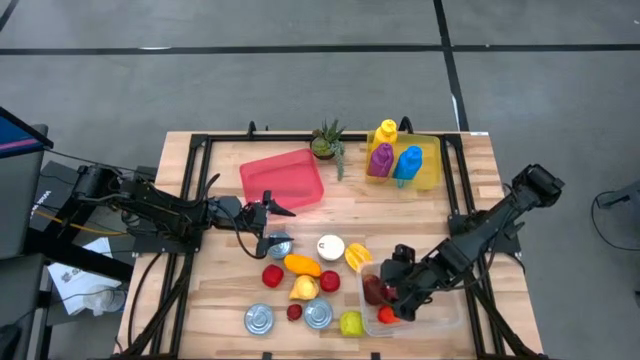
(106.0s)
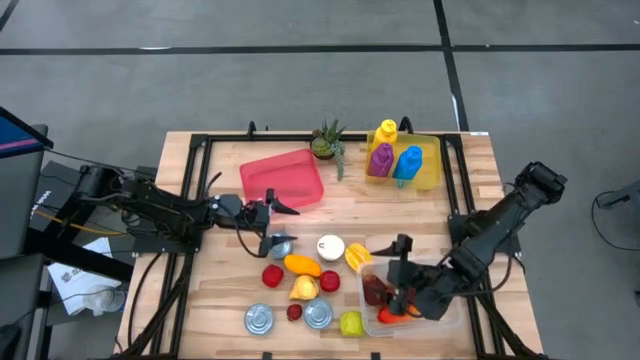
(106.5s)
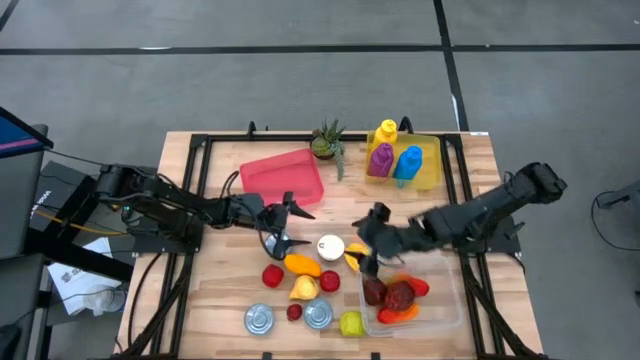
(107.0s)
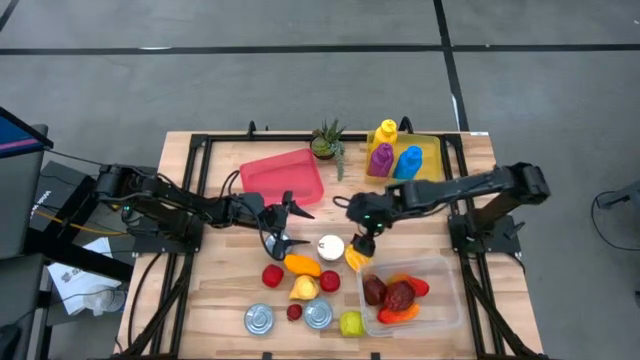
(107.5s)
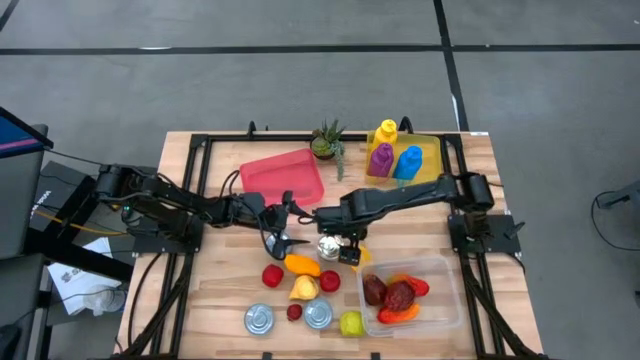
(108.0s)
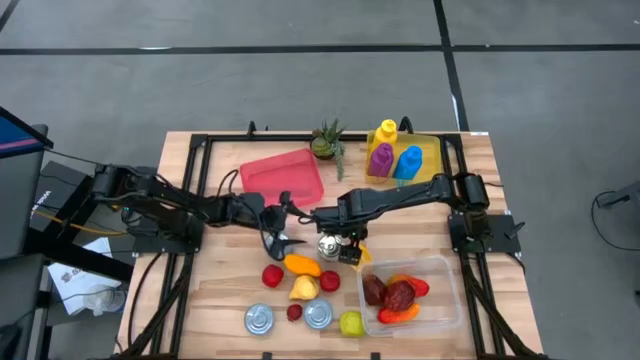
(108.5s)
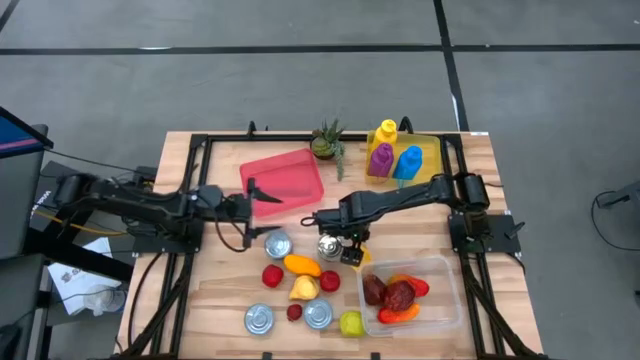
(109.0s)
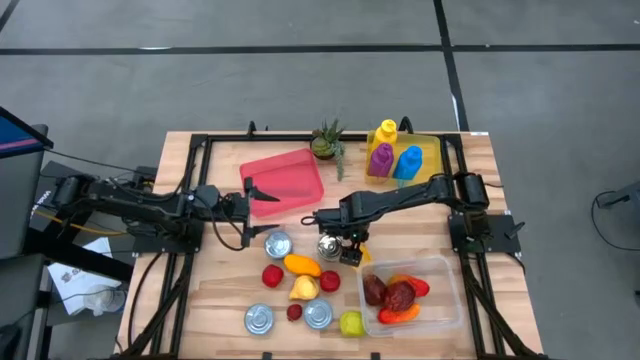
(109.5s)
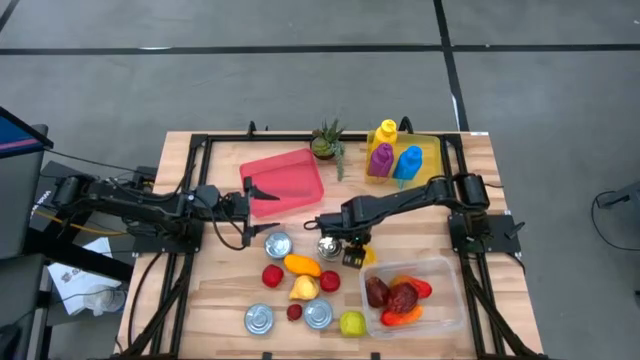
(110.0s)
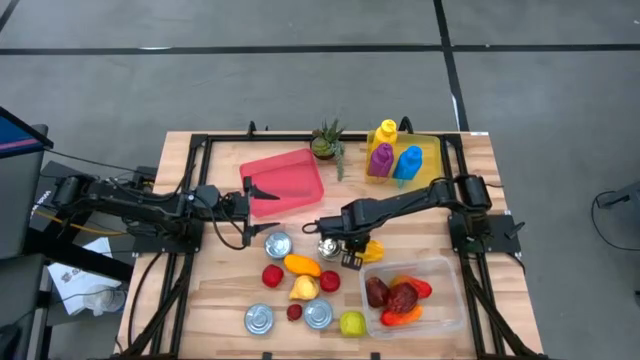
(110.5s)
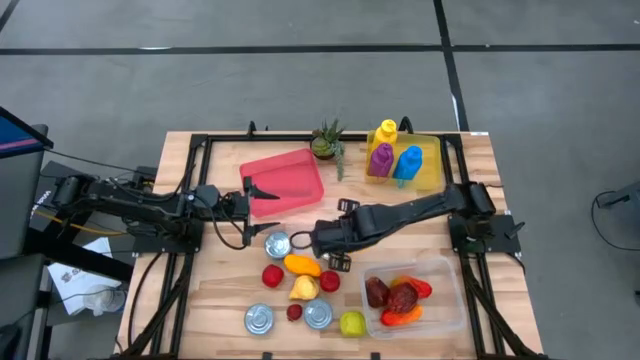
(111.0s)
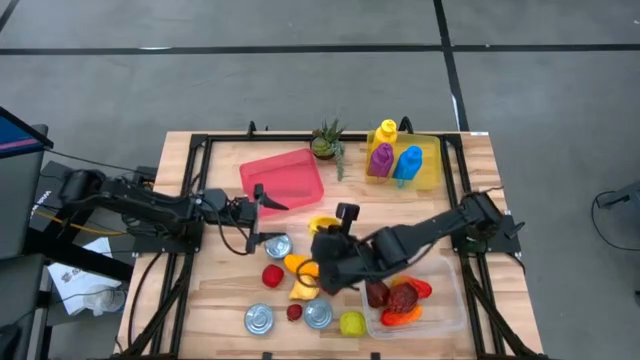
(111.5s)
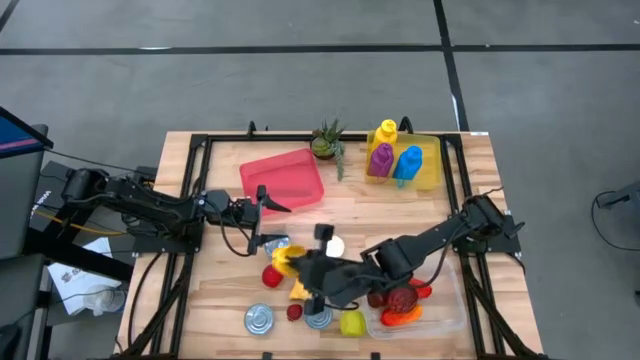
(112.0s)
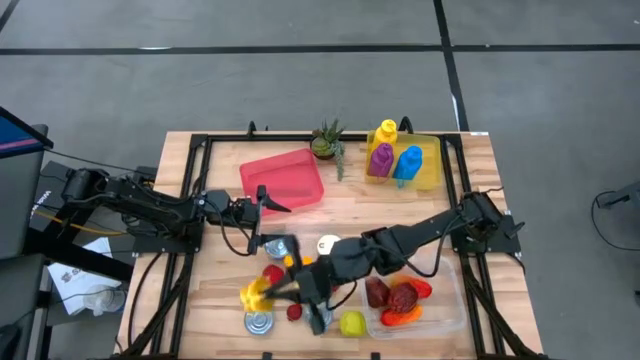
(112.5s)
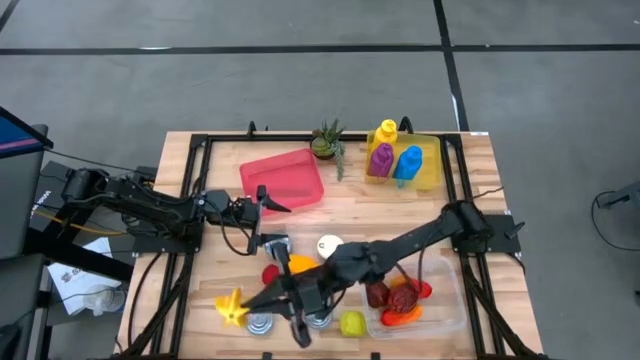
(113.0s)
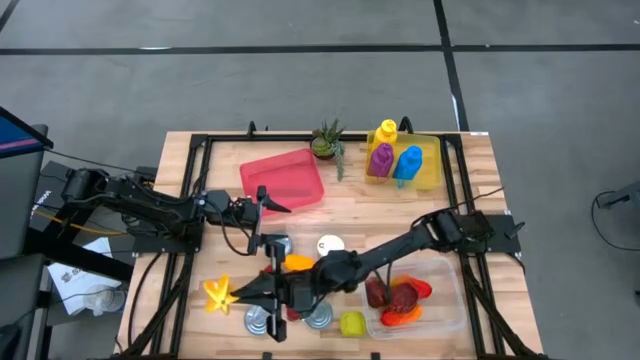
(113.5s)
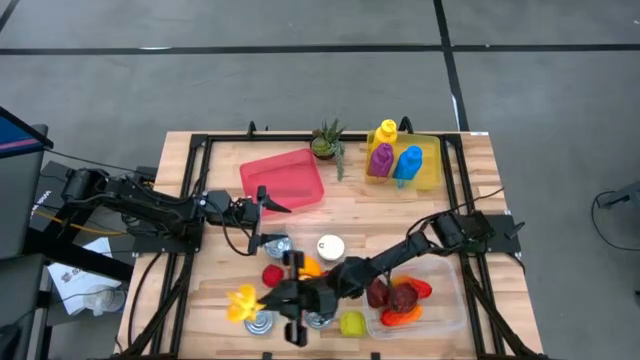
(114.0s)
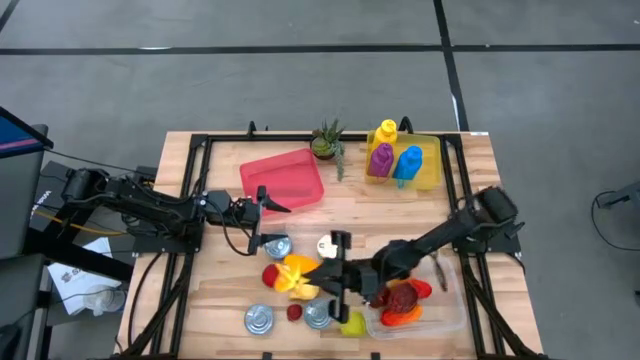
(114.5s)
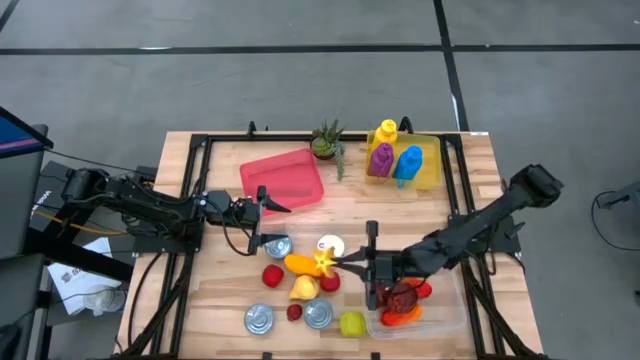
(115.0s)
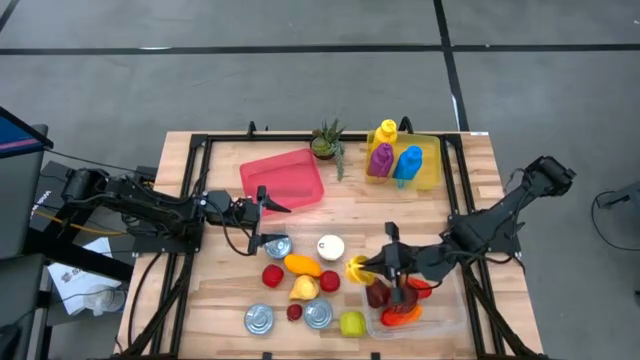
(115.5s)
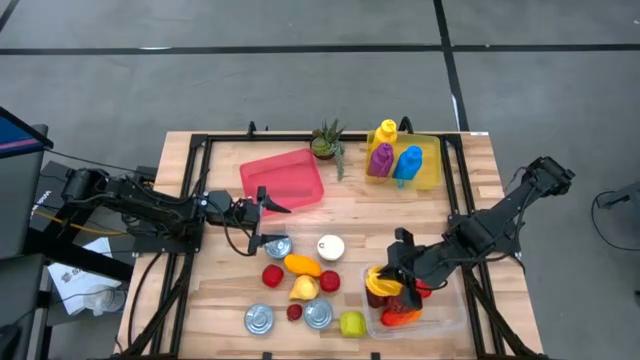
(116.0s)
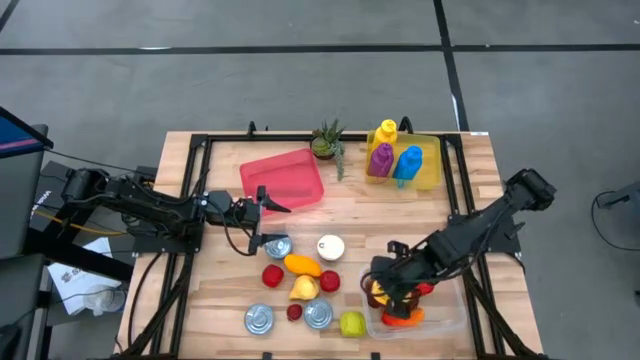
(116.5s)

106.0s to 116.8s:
Task: Pick & Place Food Item
Put the starfruit into the transparent bin

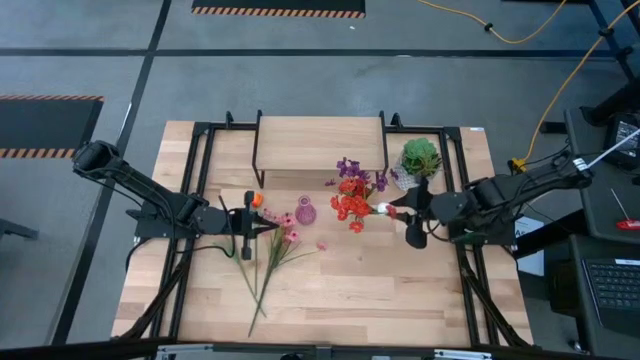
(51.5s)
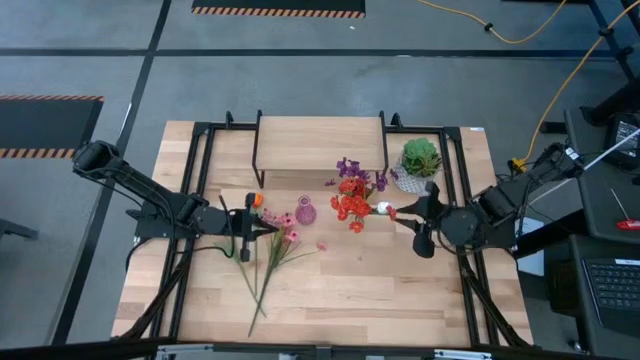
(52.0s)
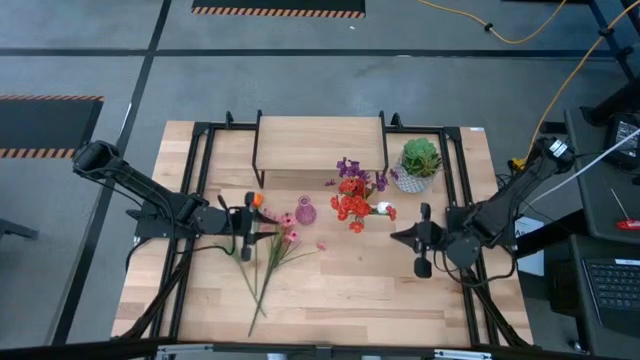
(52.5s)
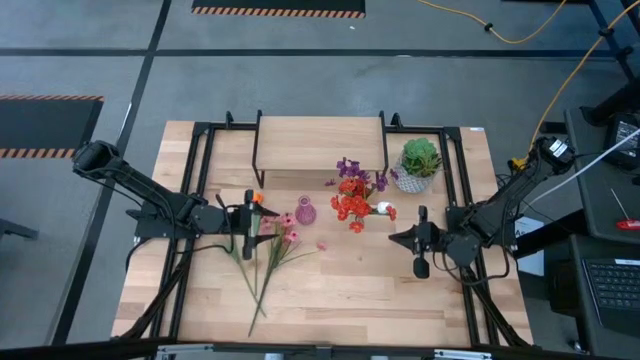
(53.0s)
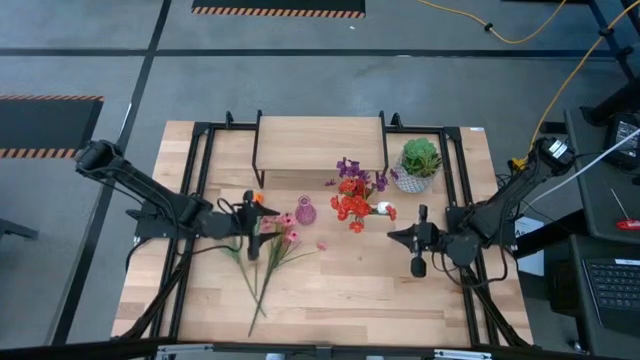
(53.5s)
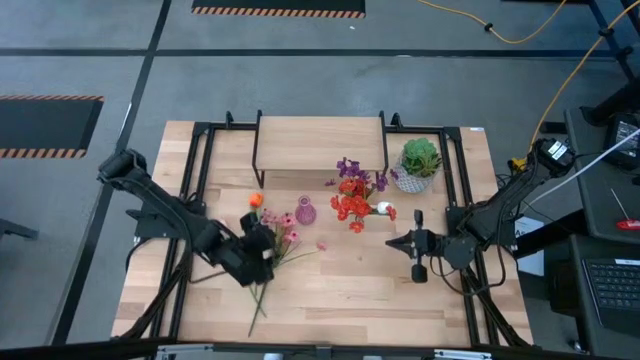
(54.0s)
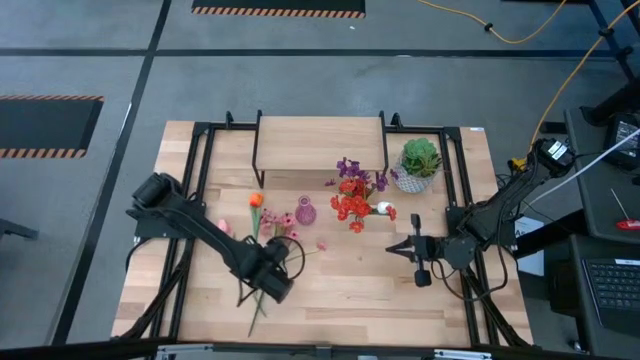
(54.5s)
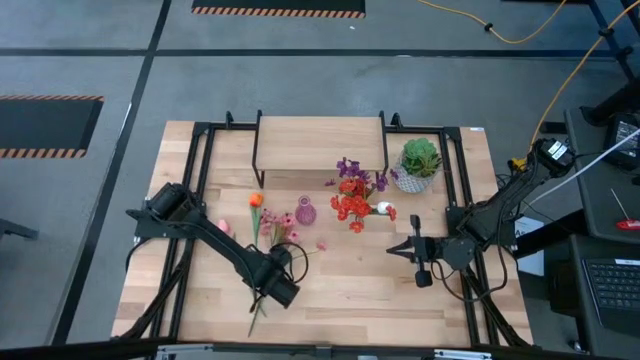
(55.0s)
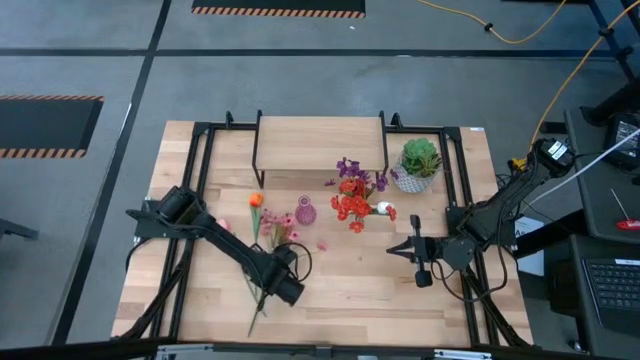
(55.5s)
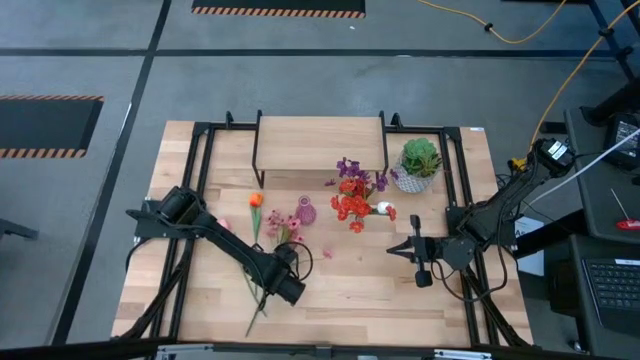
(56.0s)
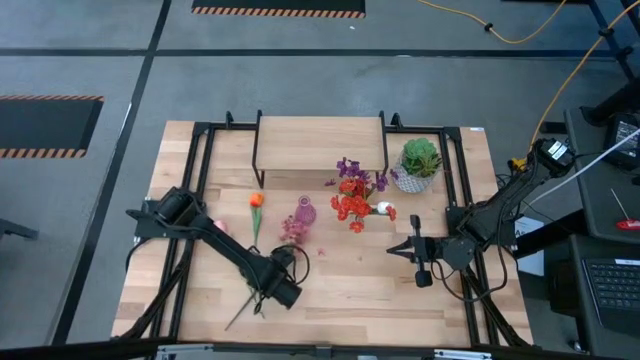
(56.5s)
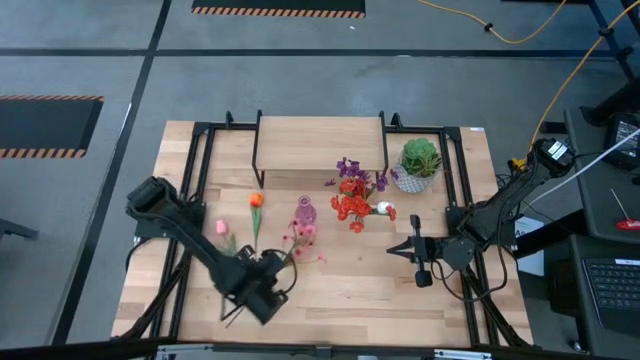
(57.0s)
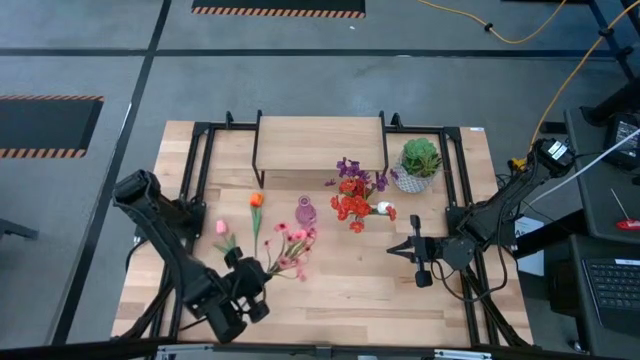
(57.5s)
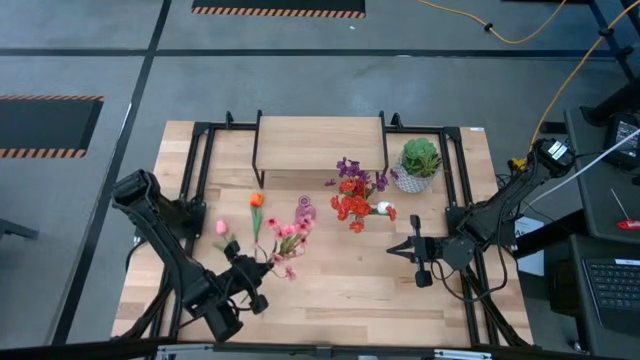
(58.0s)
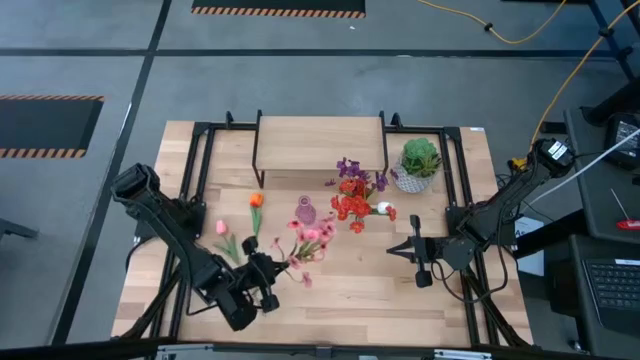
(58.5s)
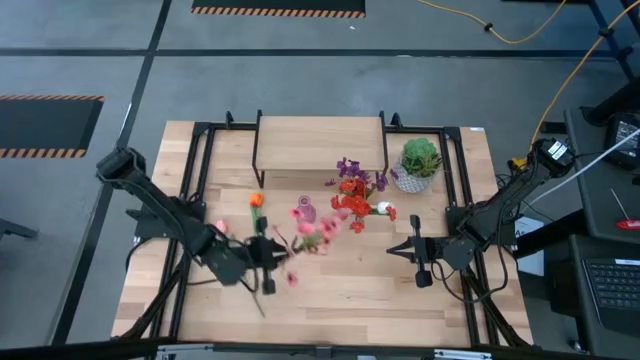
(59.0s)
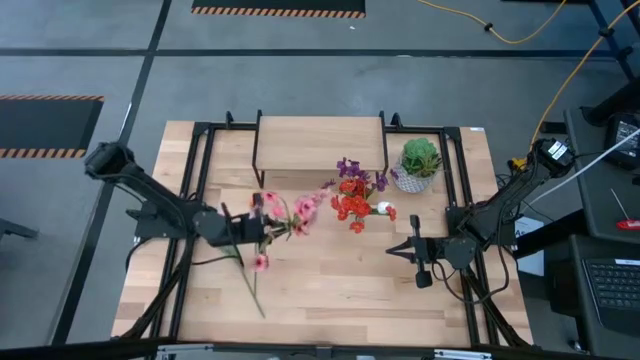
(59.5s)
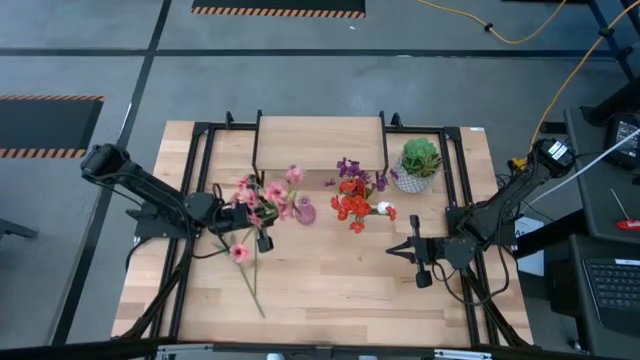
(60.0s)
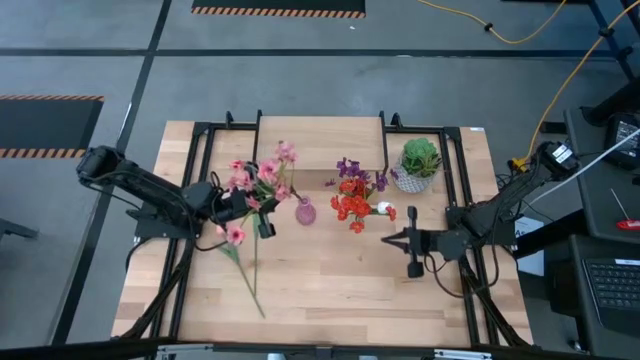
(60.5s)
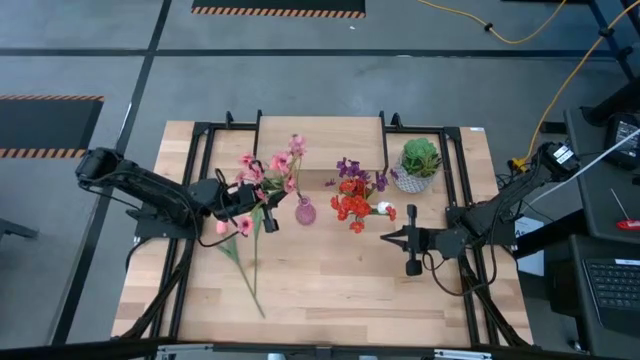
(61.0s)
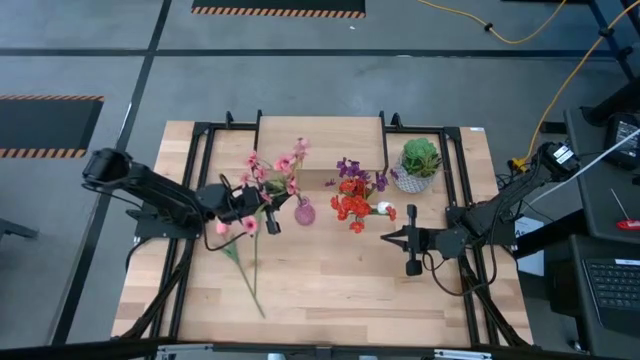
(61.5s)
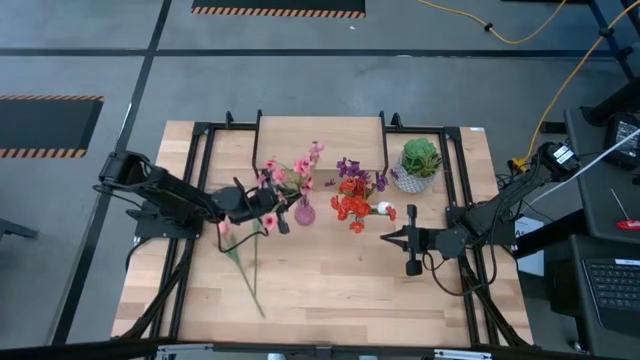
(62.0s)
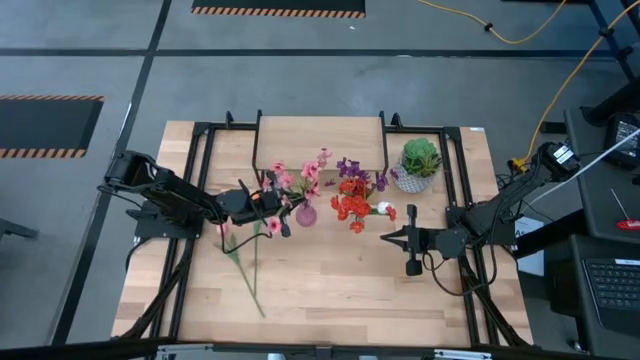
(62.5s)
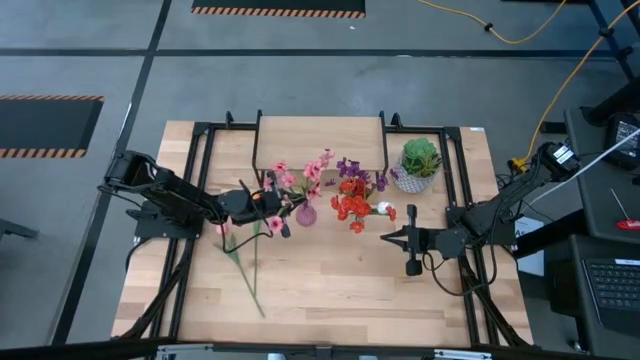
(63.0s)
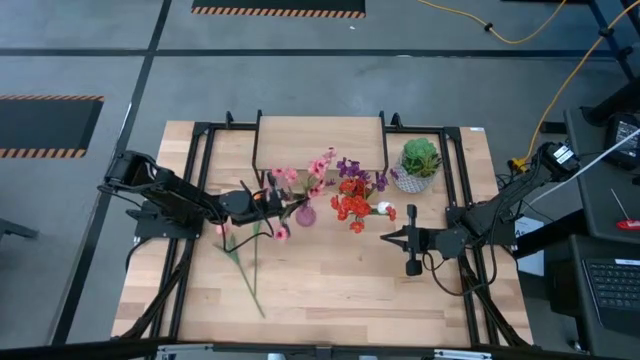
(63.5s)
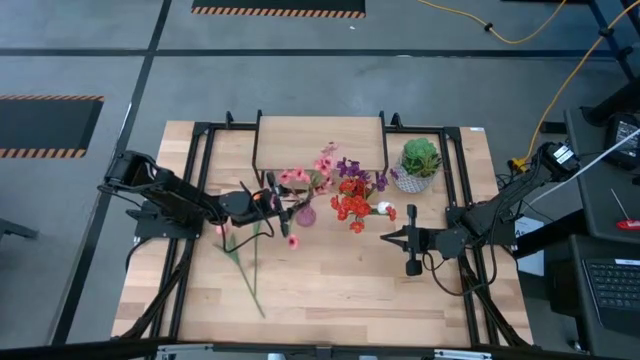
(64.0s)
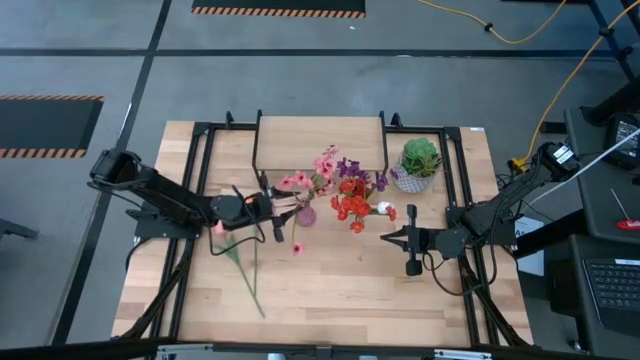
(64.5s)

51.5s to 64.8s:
Task: Pick and place flowers into a vace then onto a shelf
Put the pink flowers into the purple vase
